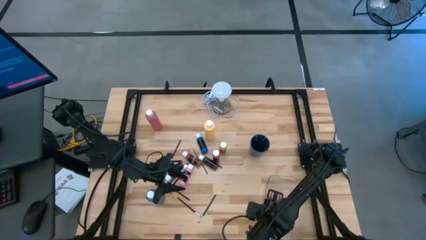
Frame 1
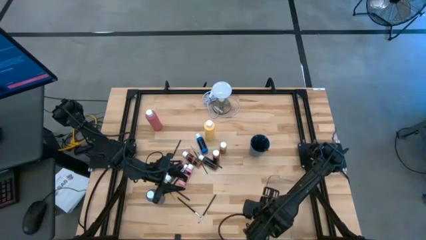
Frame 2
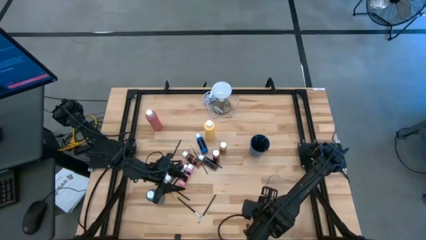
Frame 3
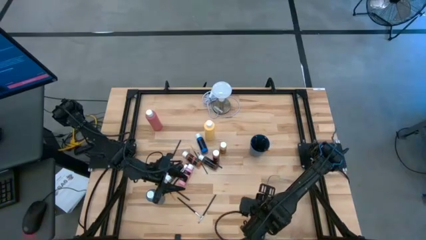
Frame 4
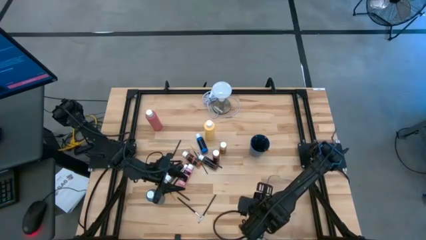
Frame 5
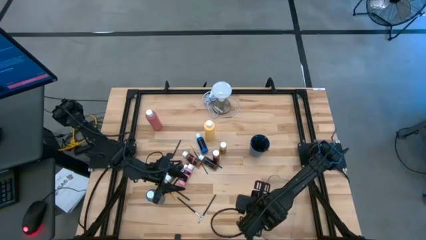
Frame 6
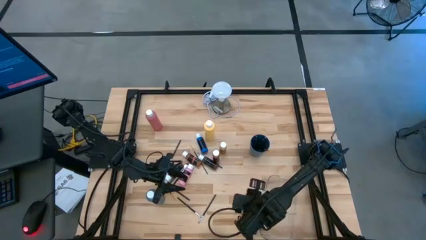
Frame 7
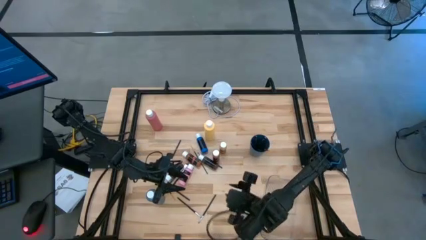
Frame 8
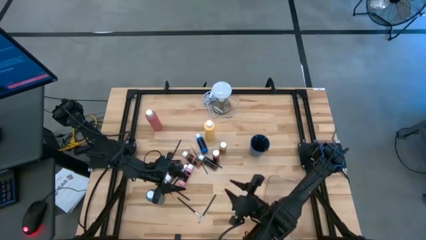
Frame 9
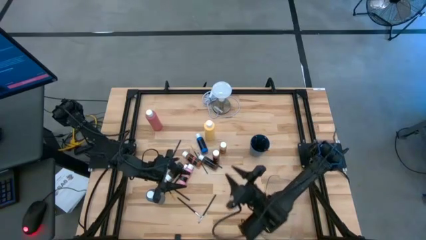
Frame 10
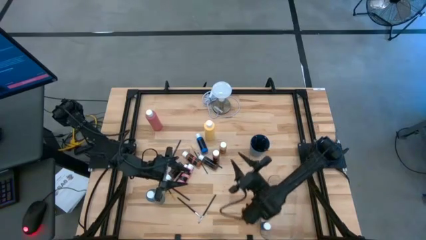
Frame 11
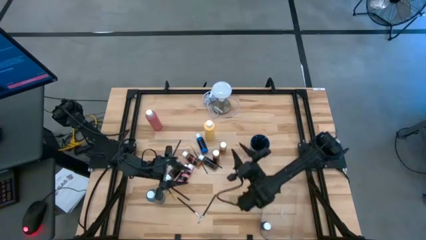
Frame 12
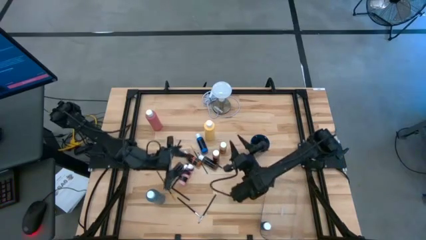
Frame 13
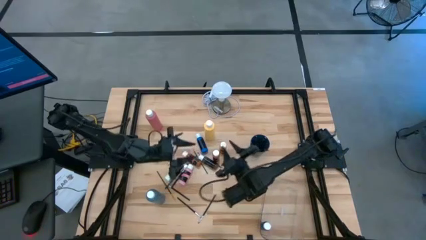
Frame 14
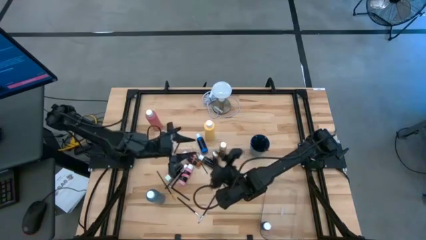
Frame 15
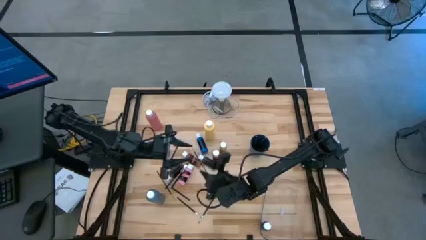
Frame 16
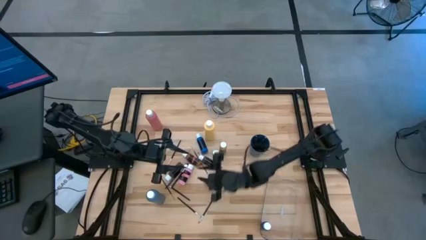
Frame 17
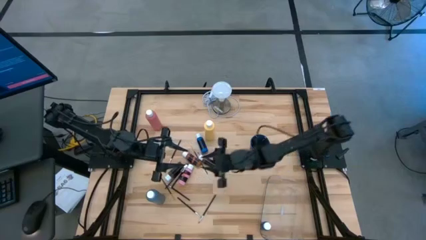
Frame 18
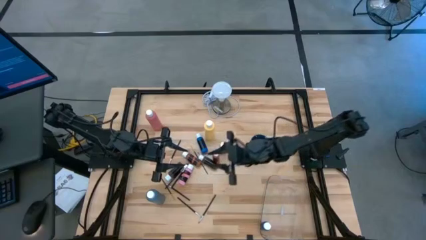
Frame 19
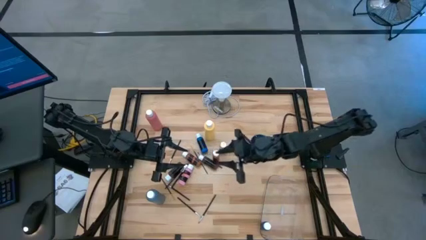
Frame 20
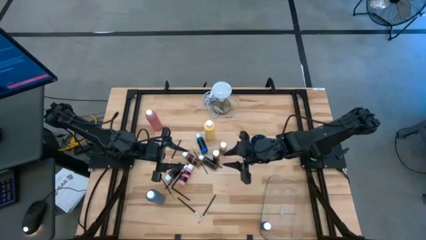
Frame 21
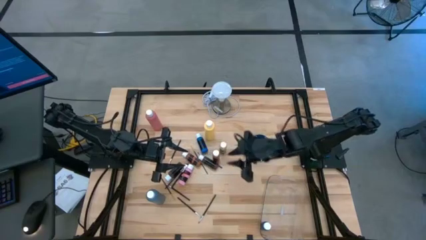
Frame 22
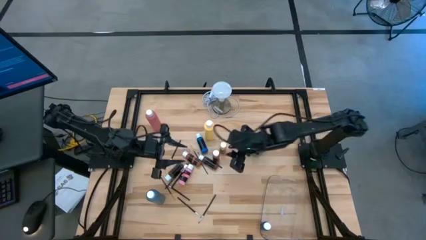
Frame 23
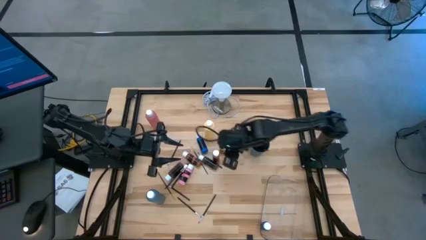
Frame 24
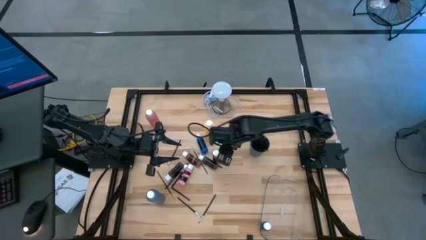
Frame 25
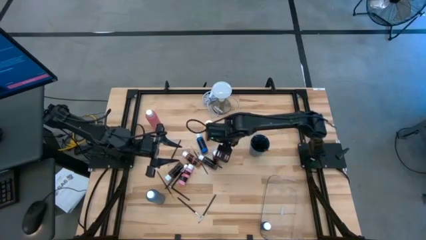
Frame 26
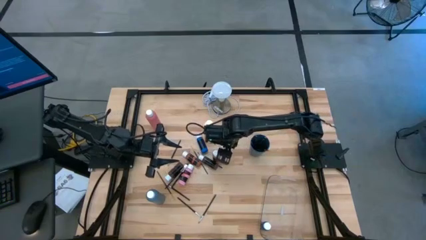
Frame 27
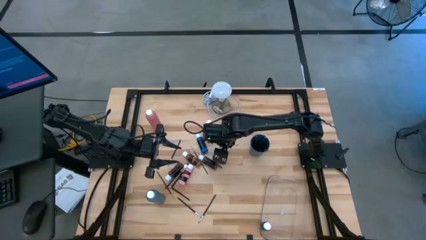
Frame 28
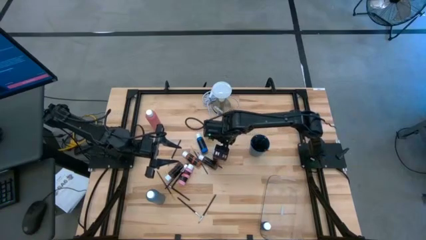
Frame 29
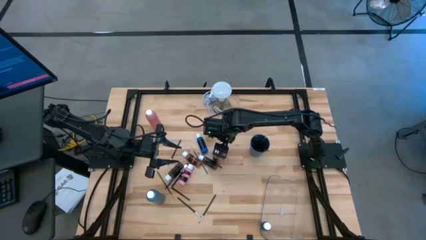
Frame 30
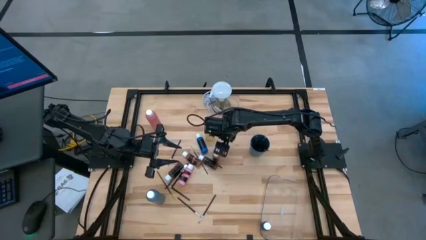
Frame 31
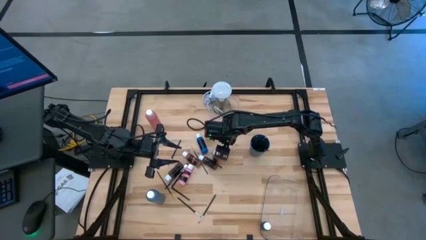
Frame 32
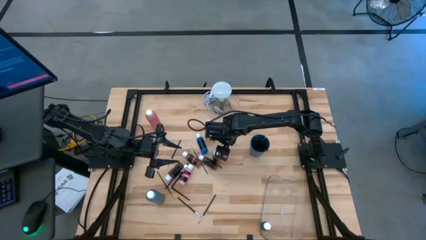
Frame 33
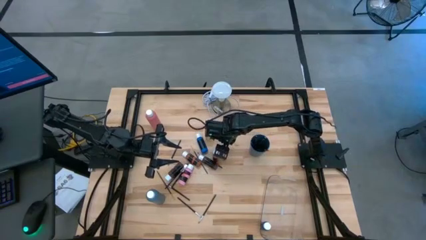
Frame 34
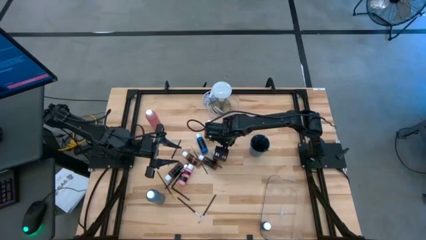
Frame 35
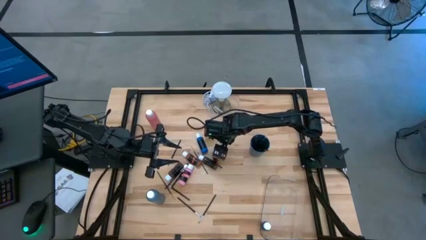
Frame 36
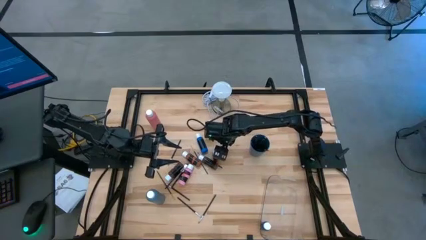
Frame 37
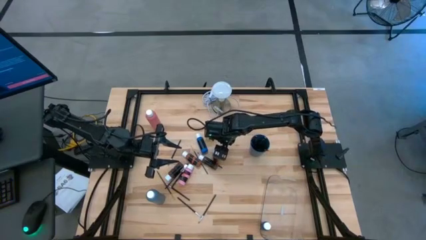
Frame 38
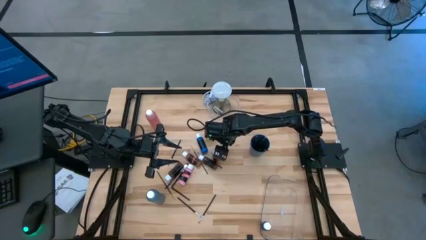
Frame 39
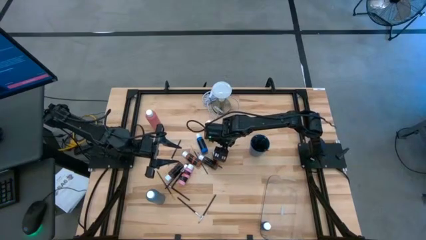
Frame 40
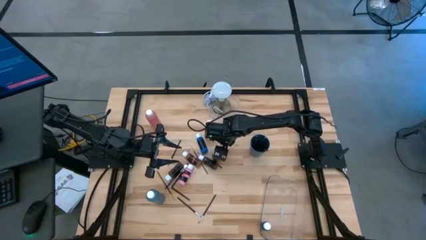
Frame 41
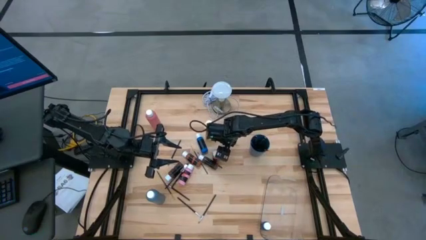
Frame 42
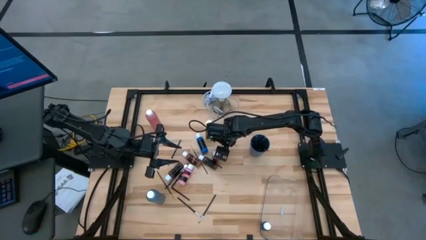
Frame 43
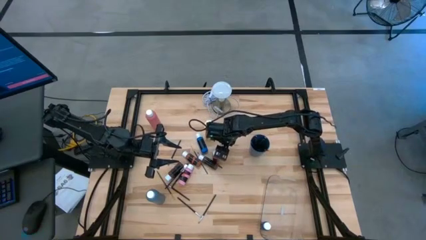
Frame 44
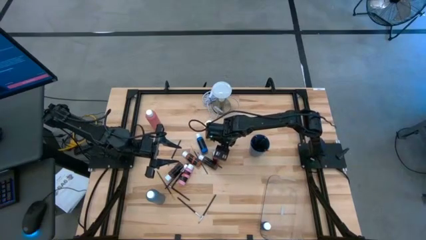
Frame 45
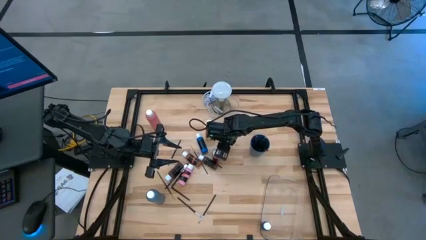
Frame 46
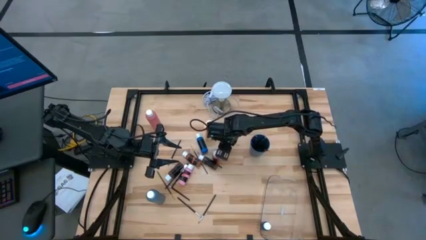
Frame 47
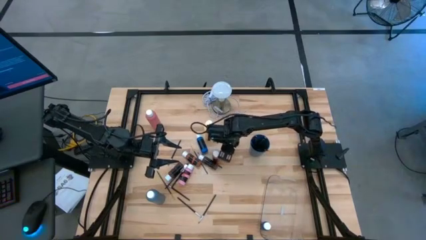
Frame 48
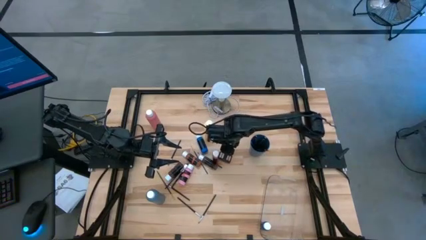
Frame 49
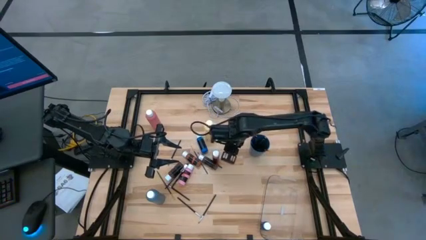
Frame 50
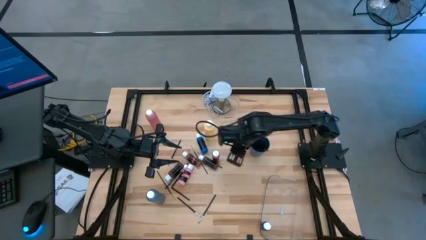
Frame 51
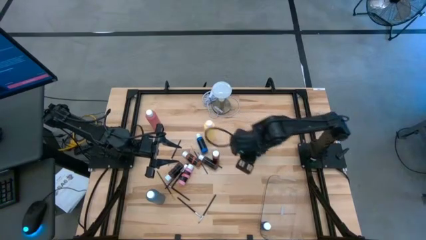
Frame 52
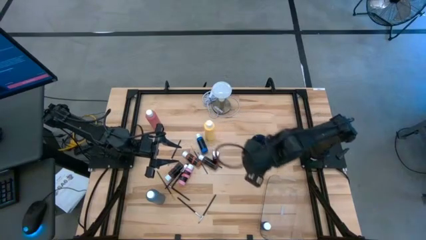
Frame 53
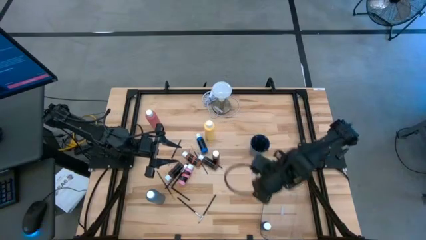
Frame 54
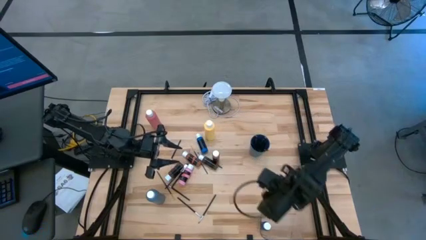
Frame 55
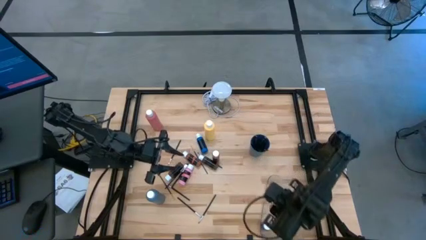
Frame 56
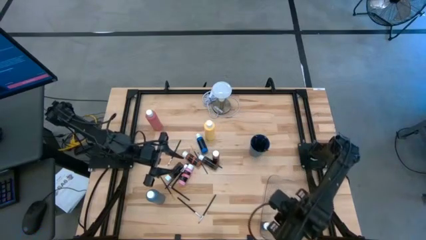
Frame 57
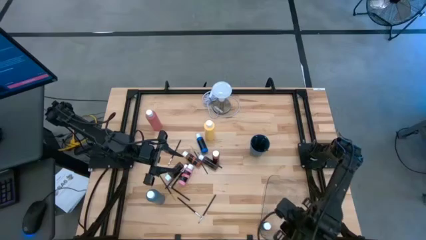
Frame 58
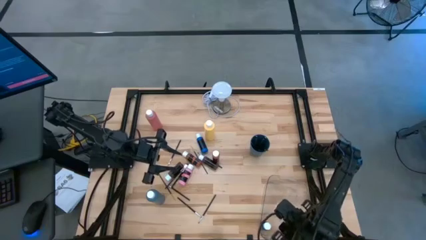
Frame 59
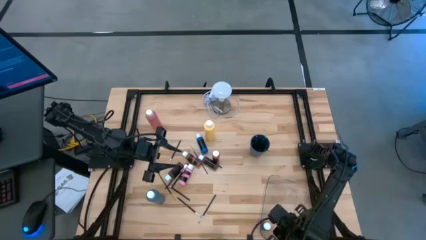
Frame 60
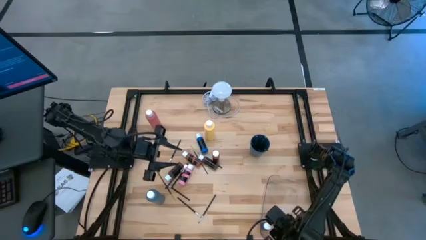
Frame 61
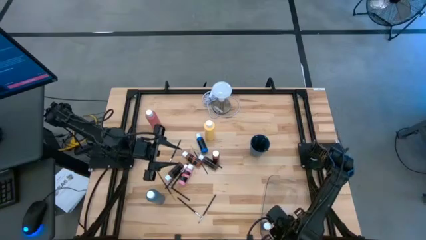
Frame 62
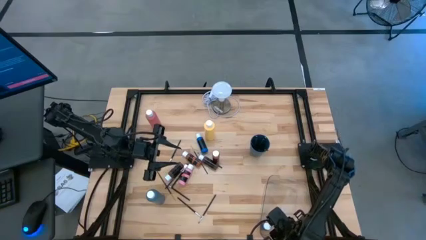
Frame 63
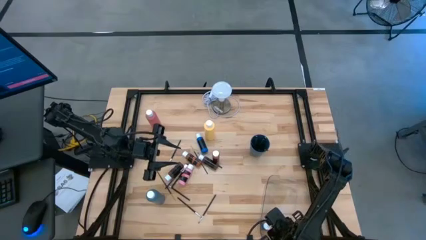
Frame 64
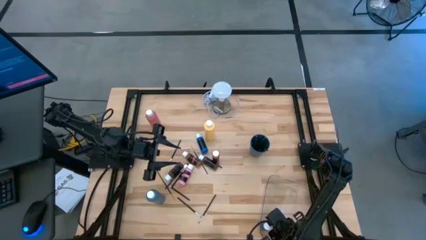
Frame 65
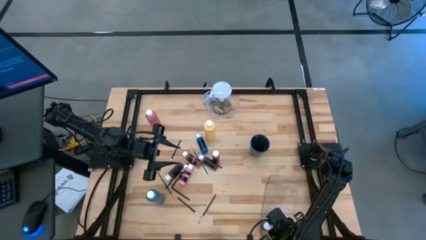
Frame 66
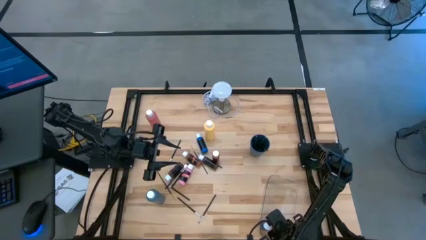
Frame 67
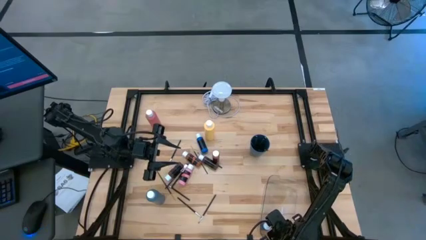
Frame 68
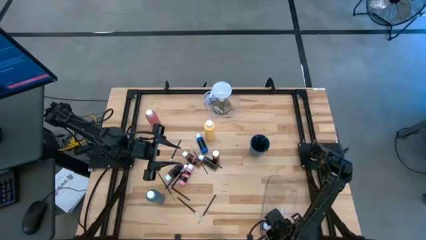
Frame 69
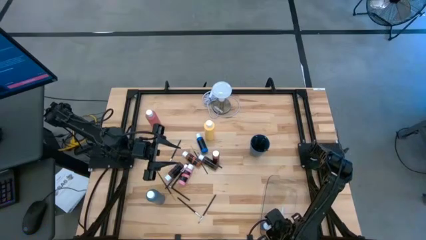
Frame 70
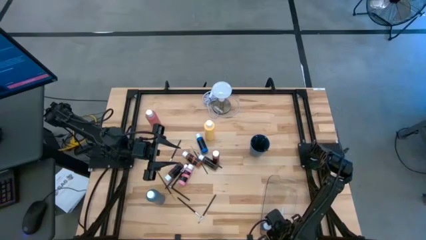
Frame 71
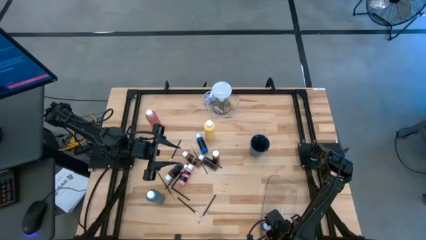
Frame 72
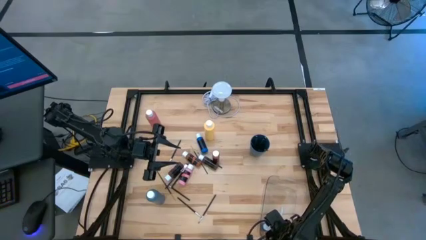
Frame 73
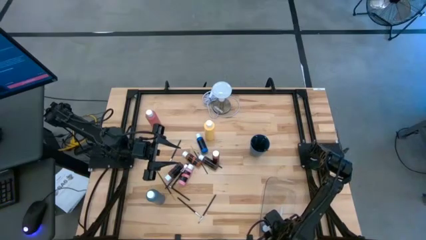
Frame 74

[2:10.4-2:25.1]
Task: Pick & Place Paint Supplies
Put the small yellow paint bottle into the transparent bin

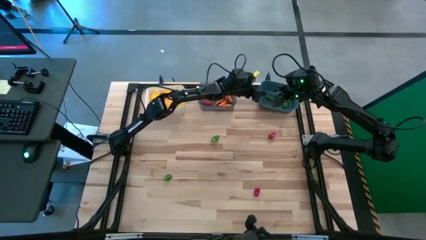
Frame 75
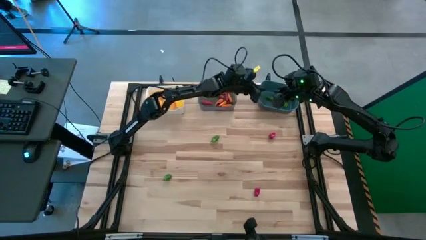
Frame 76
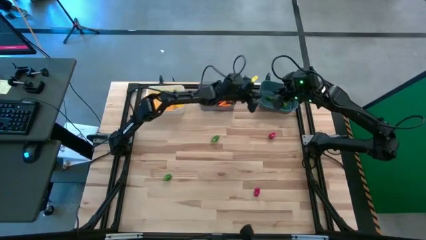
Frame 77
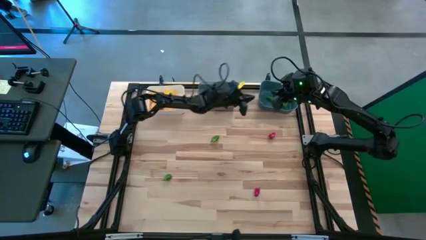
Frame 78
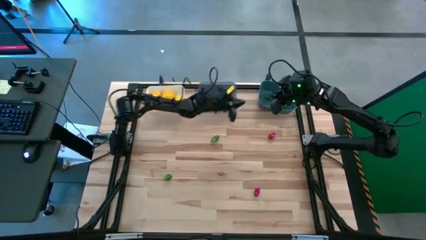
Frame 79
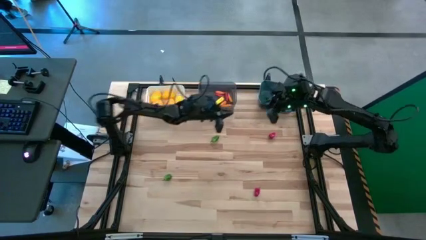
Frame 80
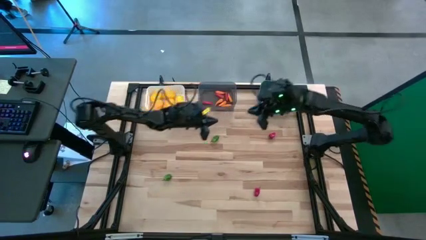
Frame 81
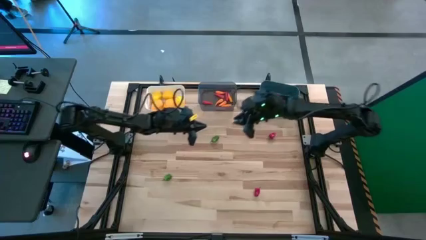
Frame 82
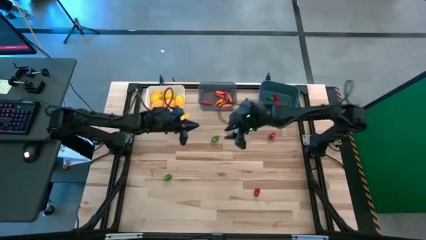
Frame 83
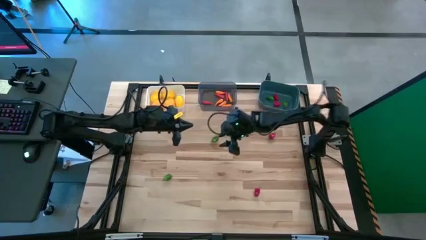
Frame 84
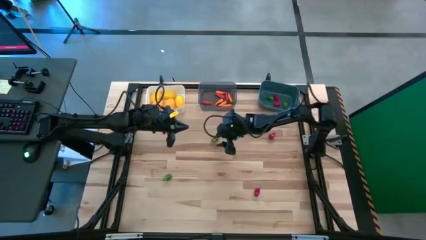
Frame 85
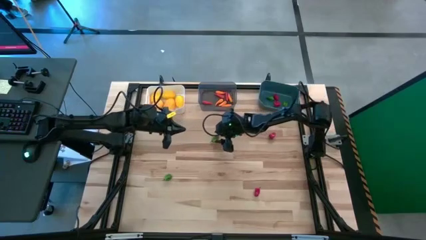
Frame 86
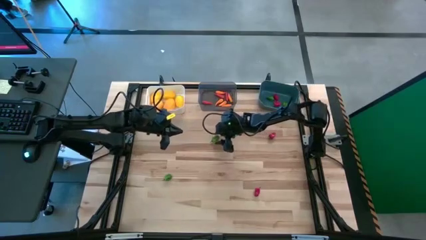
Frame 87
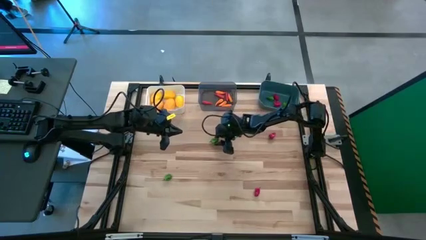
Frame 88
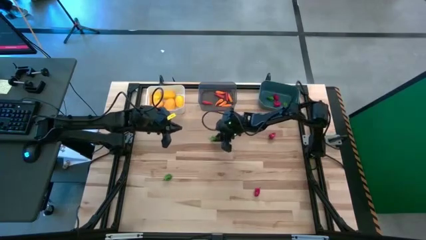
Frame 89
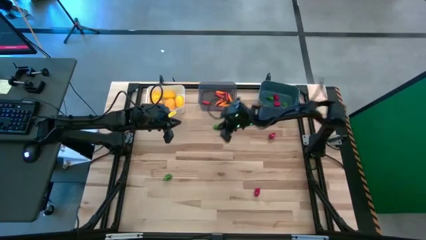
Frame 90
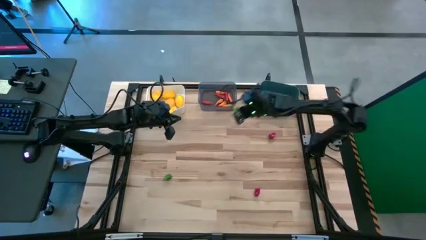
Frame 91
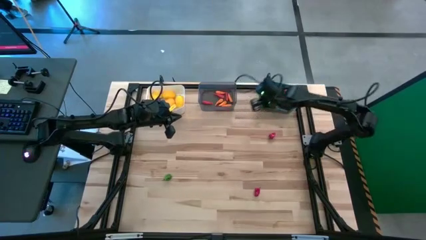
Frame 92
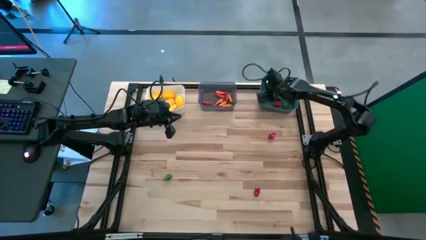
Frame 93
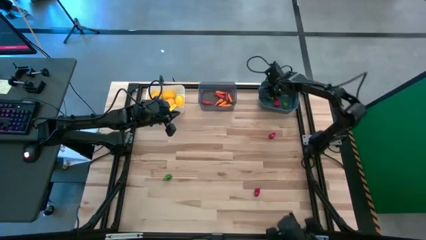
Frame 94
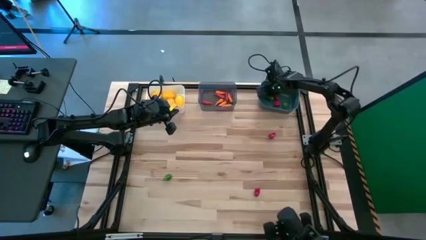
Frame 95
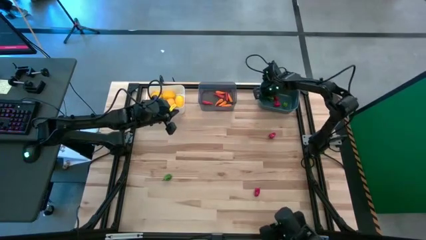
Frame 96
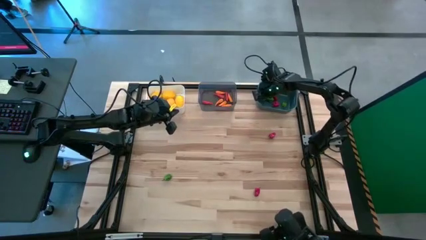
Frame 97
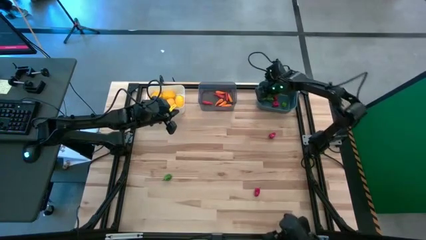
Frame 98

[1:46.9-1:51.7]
Task: Sort produce into baskets
Put the top green bell pepper into the blue bin
